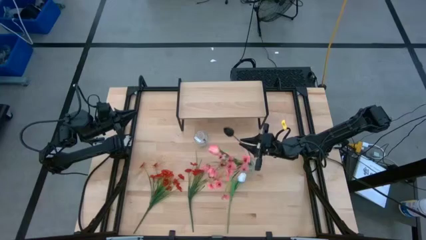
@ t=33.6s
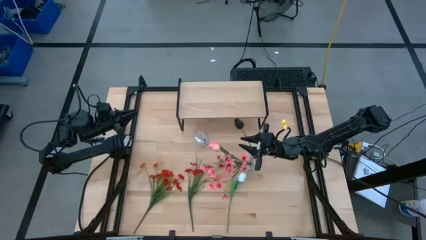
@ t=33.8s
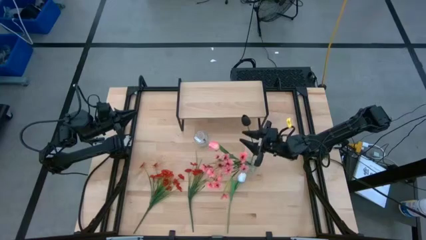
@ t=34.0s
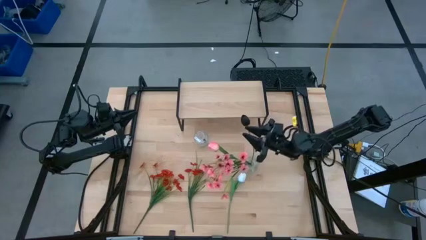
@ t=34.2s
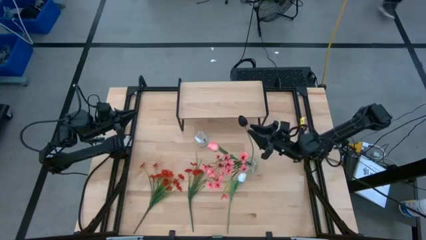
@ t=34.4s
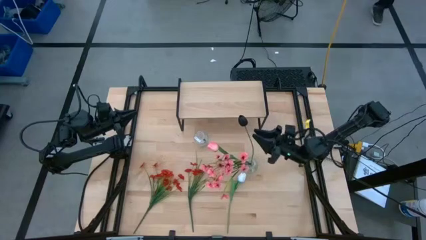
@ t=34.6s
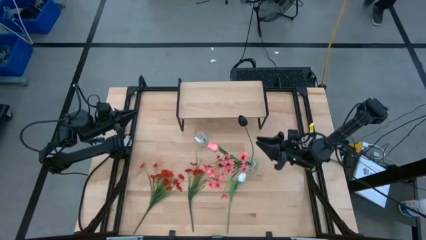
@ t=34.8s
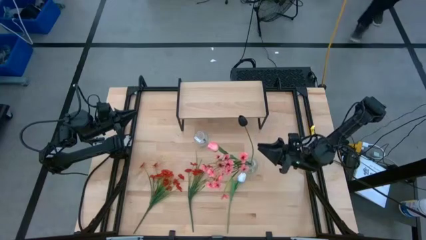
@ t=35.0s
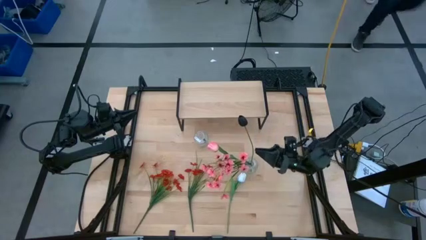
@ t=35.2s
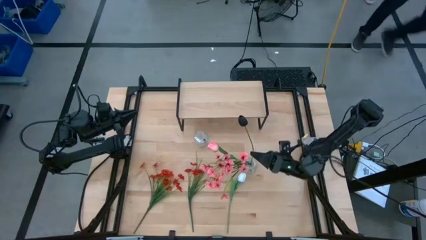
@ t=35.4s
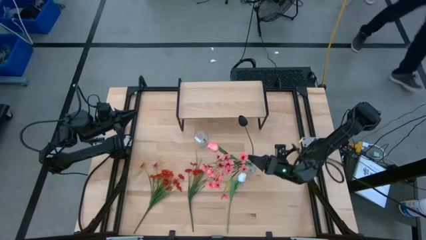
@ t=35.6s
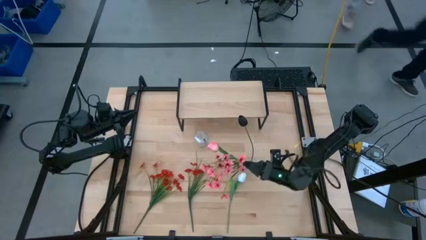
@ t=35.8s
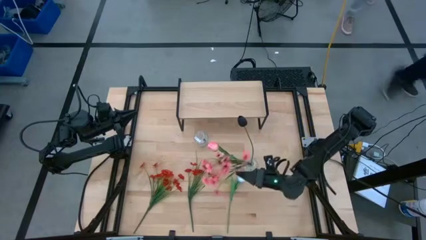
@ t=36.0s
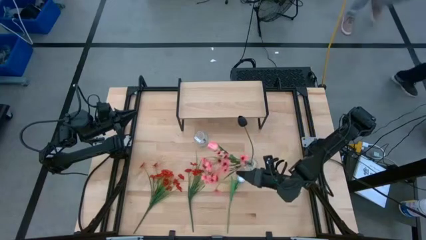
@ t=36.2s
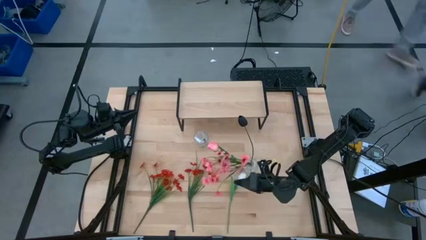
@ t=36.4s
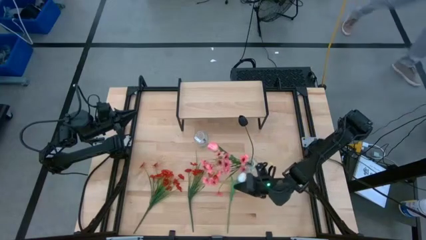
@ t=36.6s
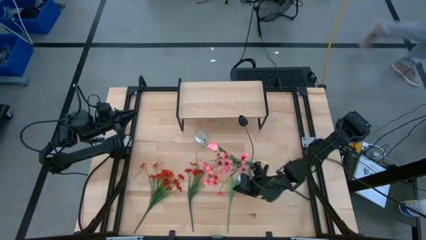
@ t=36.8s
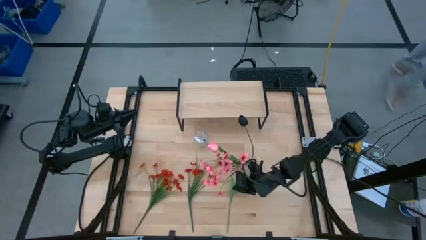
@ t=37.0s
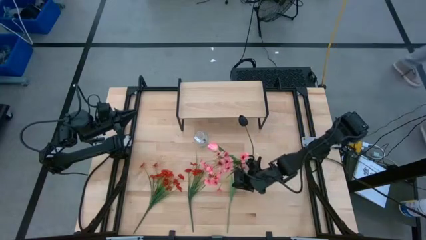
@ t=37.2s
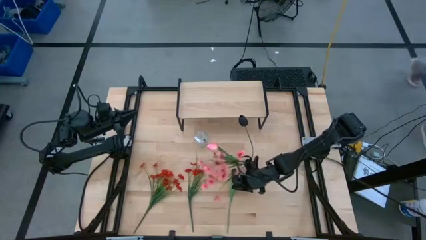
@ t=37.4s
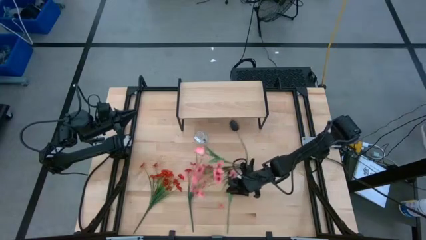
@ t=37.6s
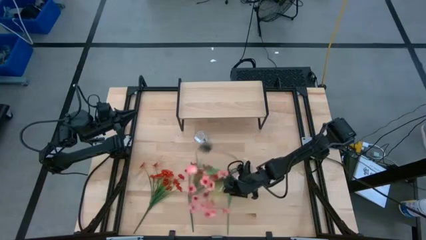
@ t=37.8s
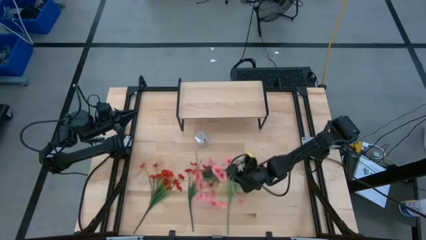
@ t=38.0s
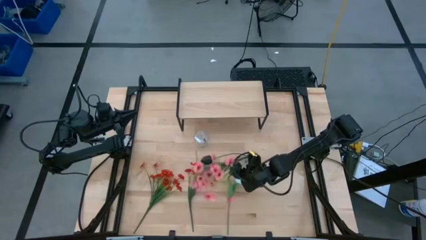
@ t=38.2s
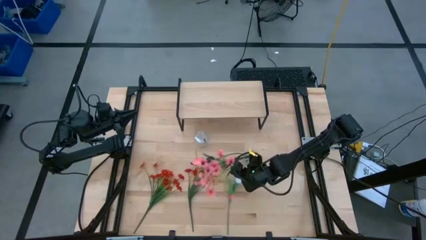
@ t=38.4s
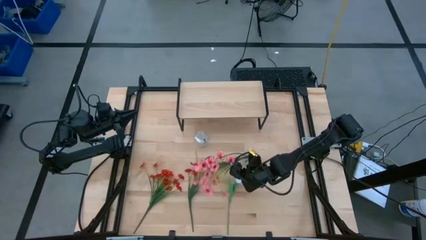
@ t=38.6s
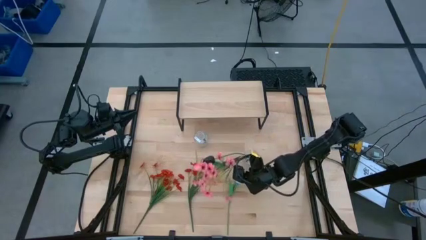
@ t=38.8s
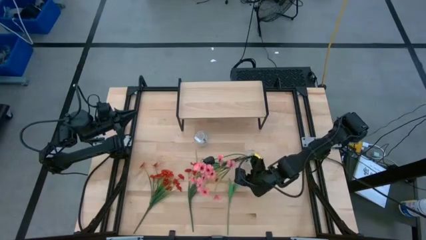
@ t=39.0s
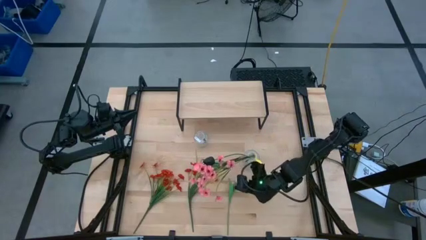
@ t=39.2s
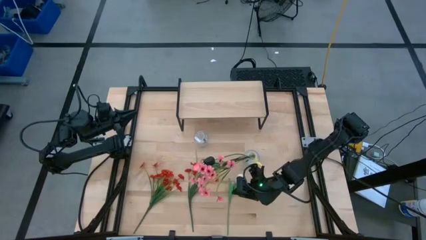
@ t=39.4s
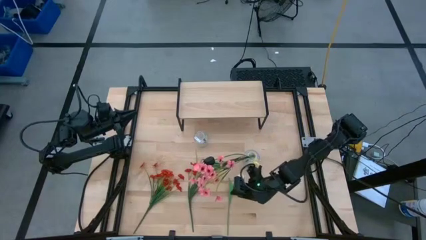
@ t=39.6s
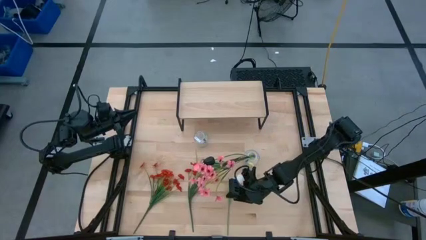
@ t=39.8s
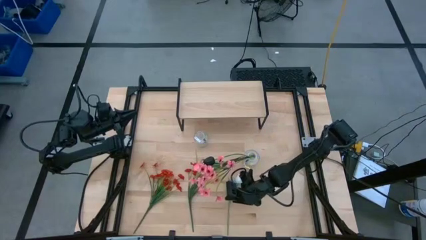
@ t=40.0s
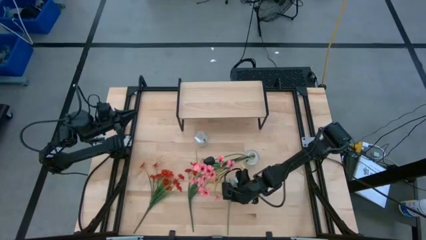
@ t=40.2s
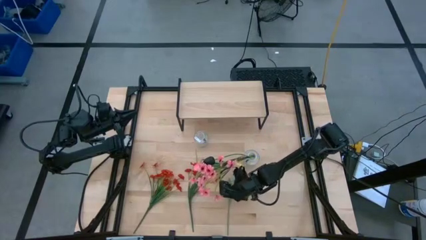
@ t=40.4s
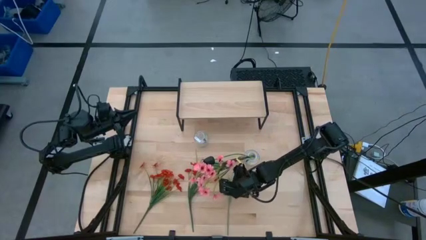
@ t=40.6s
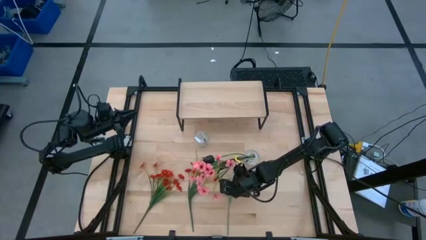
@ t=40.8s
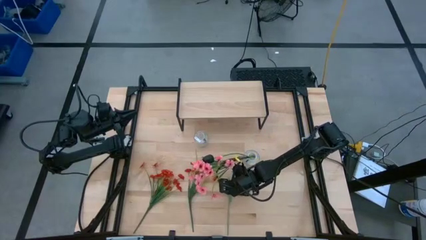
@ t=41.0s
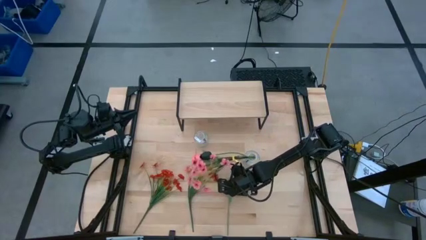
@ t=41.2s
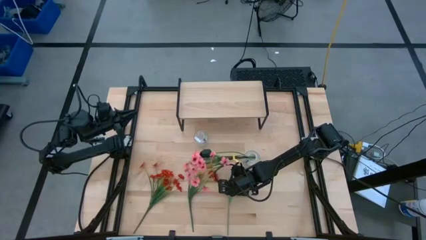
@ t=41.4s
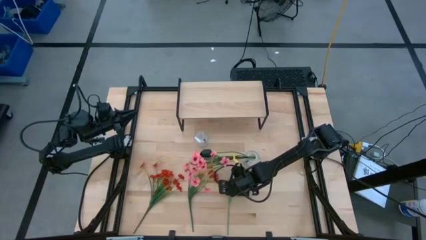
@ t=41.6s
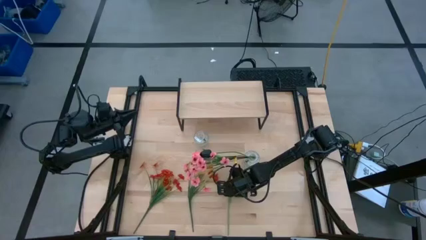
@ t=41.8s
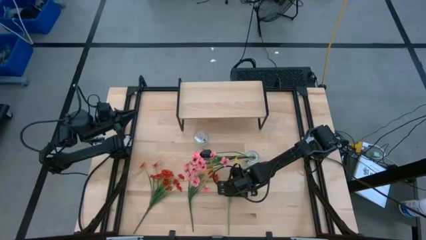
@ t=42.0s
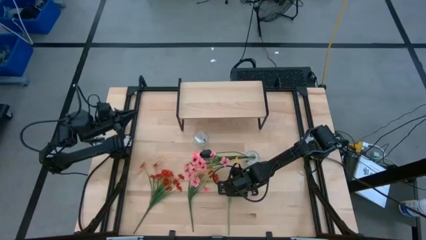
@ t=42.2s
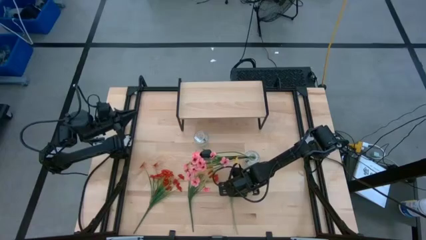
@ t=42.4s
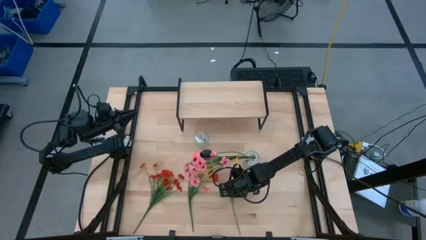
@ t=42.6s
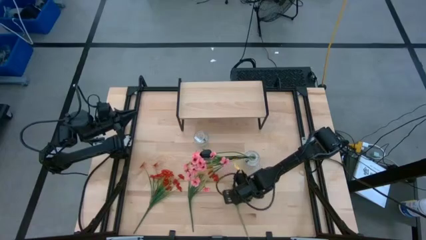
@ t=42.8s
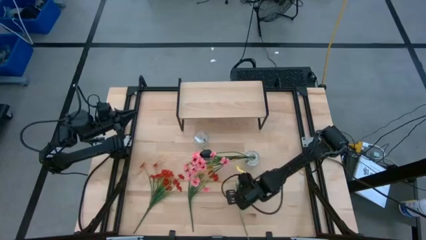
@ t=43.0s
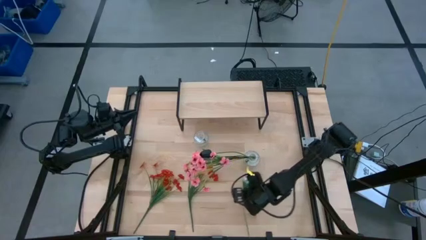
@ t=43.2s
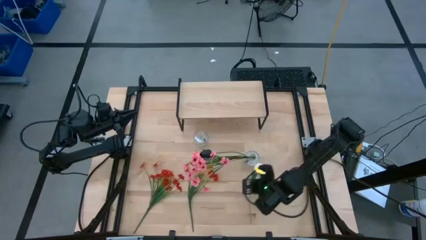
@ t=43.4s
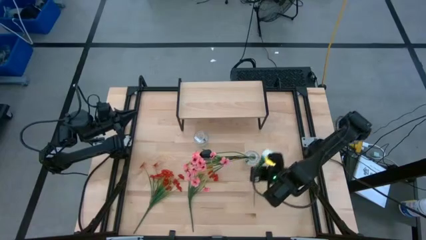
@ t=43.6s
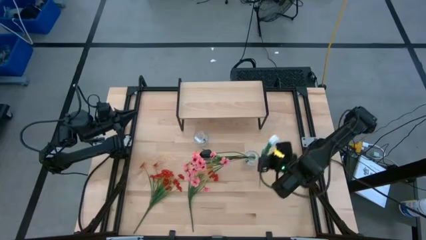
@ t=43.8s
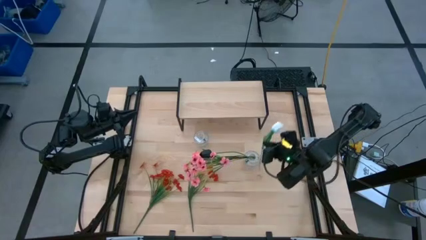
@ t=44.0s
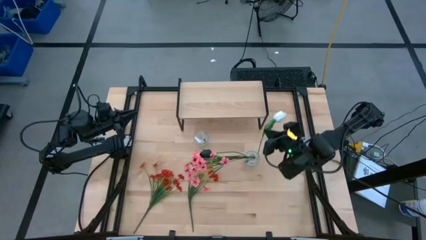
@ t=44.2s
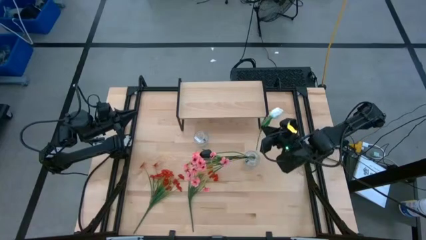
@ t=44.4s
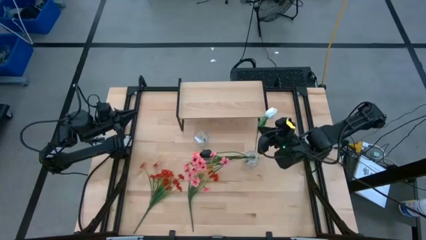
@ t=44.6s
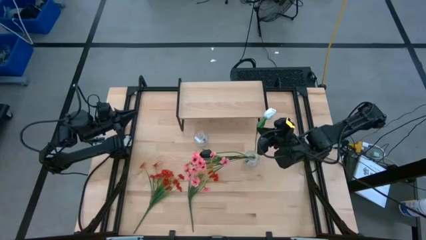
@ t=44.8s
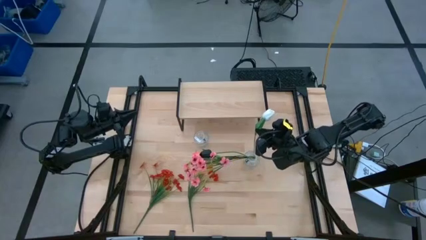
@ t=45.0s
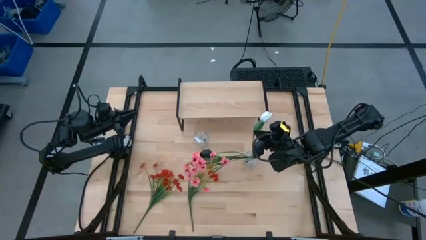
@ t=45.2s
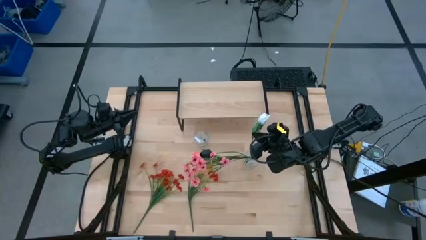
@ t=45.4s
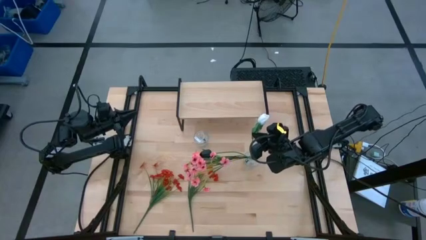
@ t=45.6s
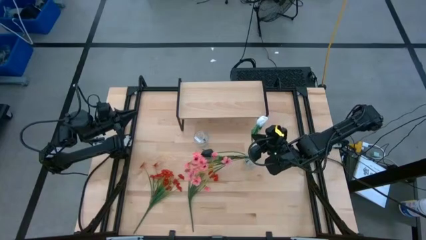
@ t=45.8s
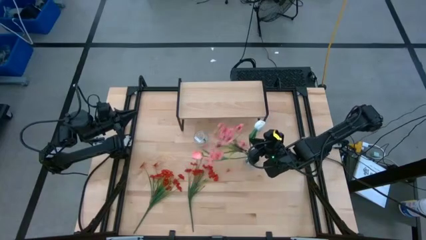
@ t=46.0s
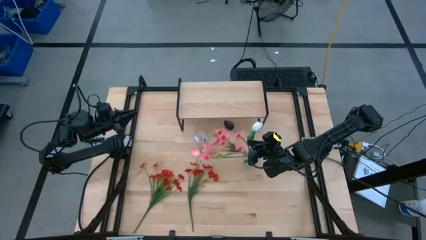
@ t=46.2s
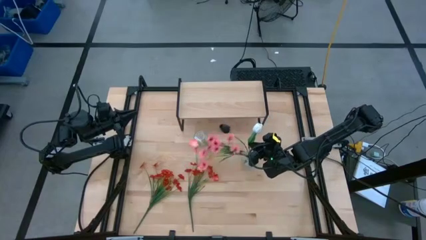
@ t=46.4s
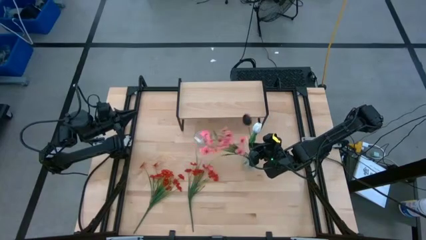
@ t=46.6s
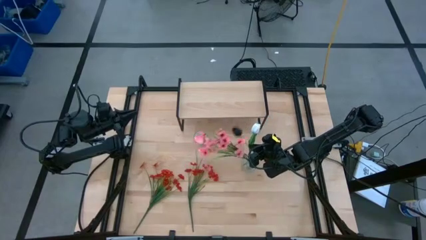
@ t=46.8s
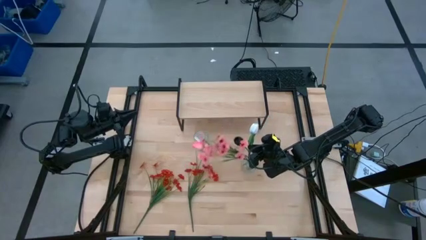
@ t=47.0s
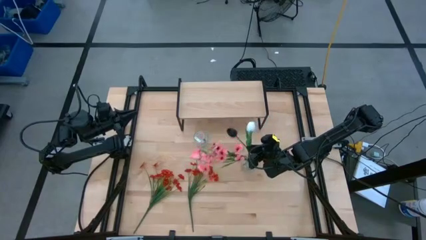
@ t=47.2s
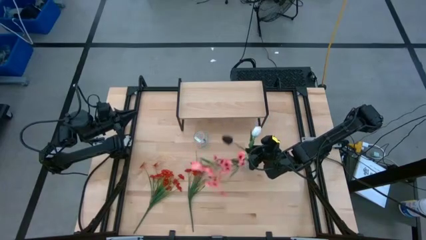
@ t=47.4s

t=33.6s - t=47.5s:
Task: Pick and place flowers into a vace then onto a shelf
Put the white tulip into the right transparent vase
